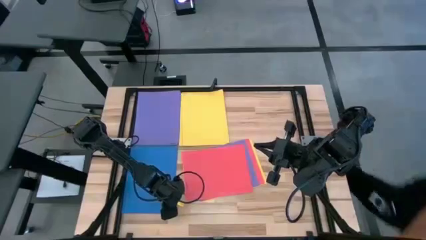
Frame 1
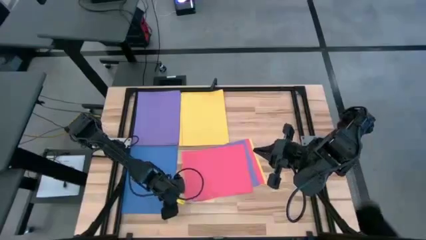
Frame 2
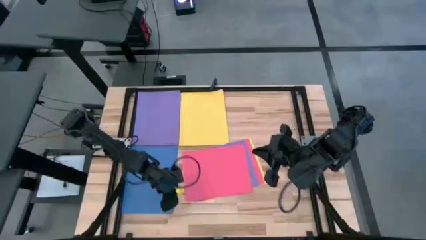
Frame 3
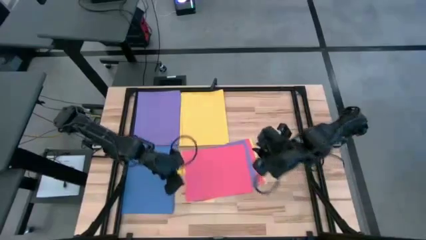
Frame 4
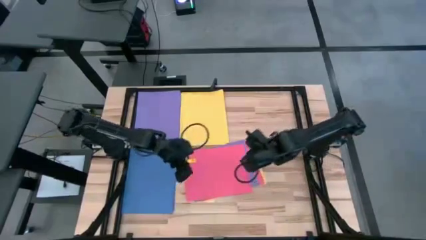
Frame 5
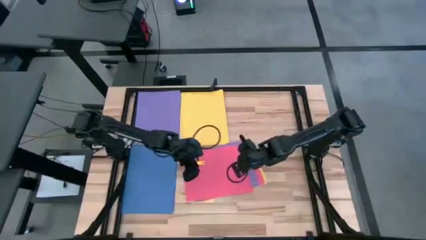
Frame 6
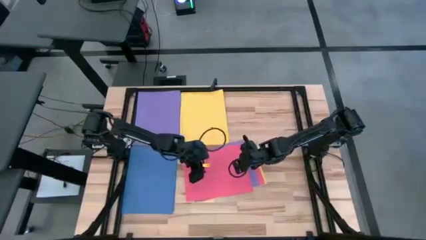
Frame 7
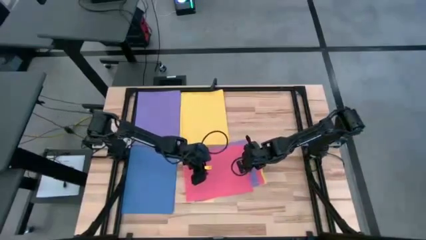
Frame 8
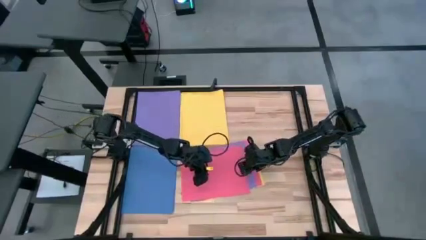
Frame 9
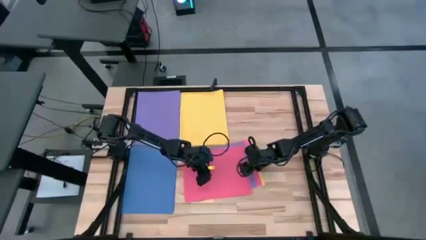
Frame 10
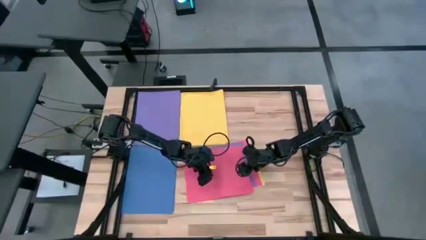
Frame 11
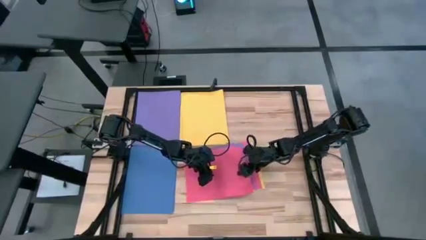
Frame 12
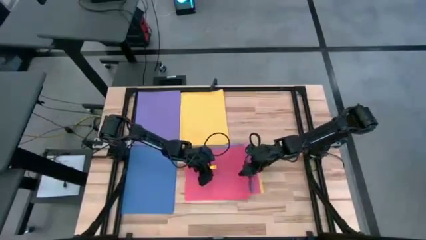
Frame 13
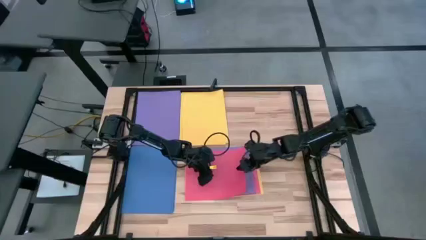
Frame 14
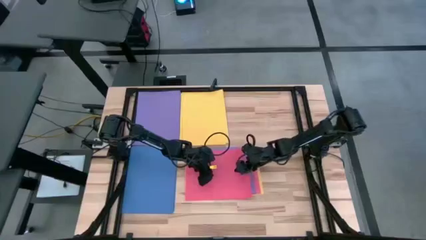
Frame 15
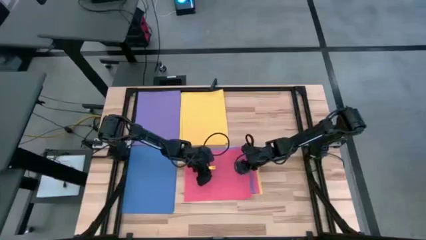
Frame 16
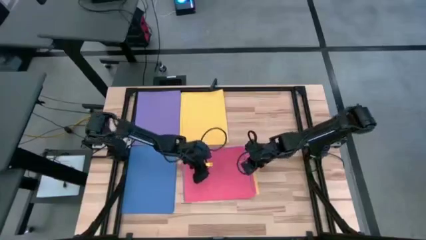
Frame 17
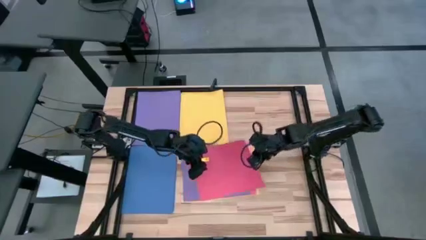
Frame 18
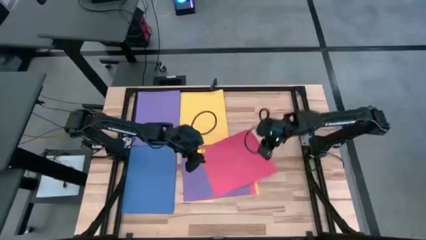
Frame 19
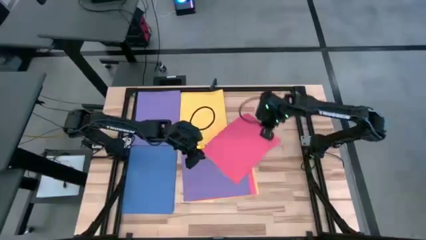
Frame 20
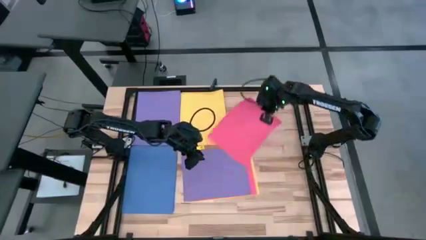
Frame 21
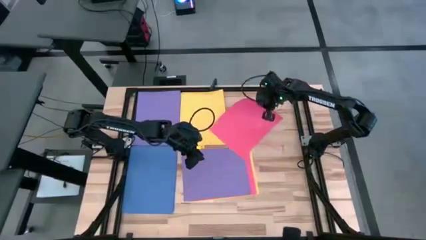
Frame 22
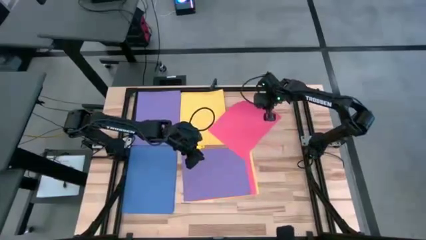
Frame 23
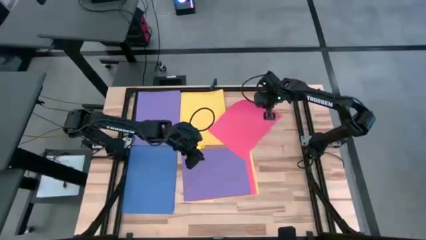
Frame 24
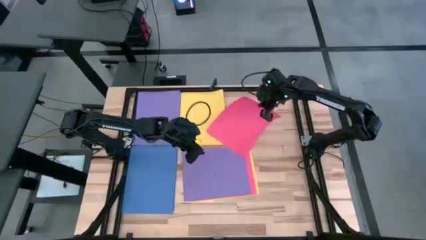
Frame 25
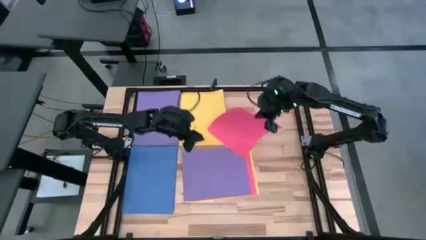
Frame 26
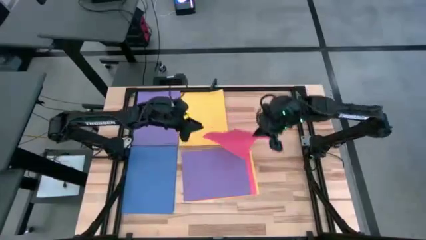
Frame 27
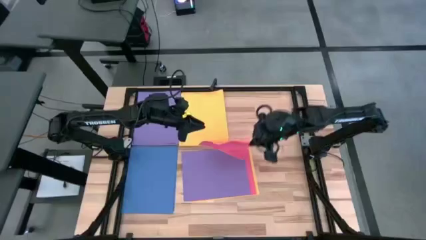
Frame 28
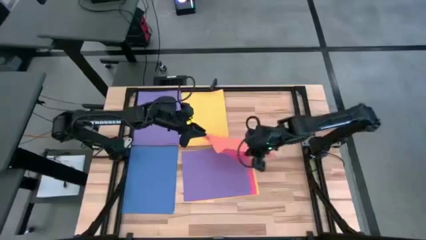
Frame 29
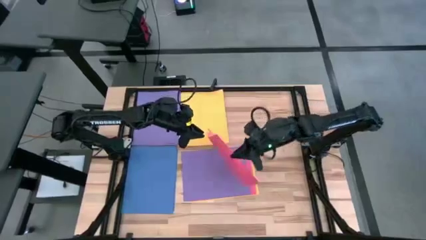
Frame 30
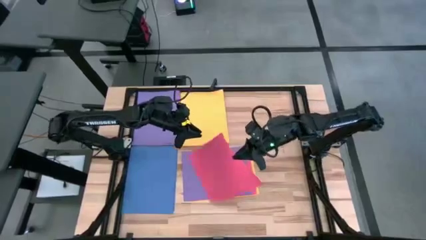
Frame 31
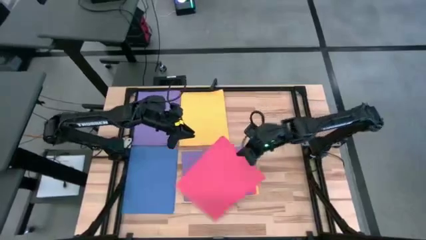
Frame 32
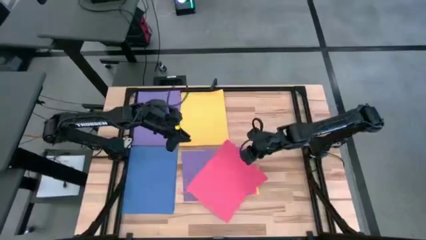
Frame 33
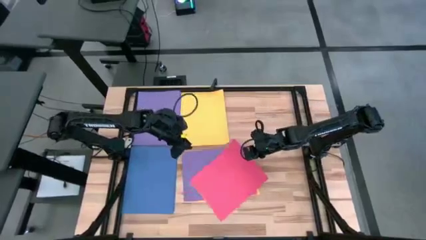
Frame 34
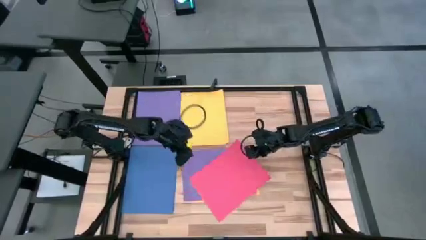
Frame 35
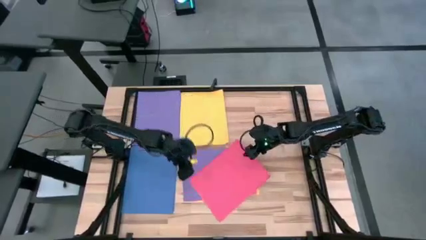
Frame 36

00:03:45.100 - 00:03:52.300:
Task: Organize paper
Move the red paper to the top right of the table

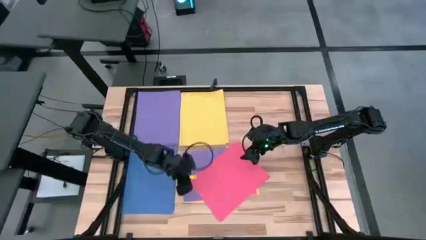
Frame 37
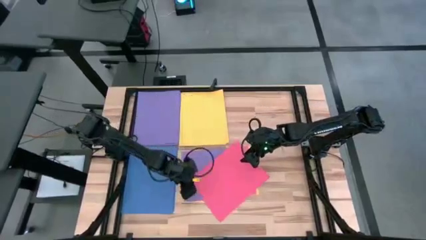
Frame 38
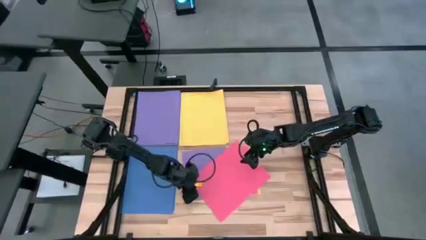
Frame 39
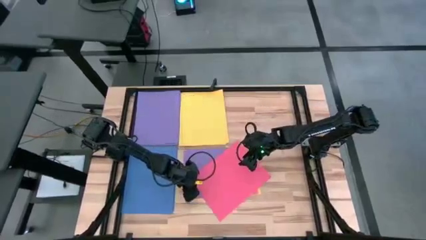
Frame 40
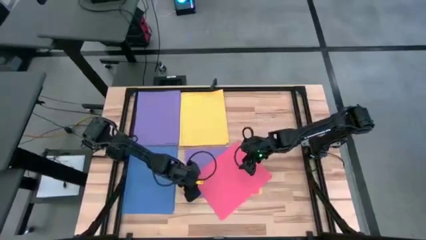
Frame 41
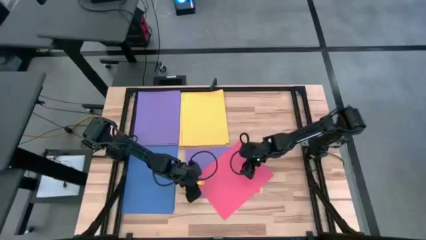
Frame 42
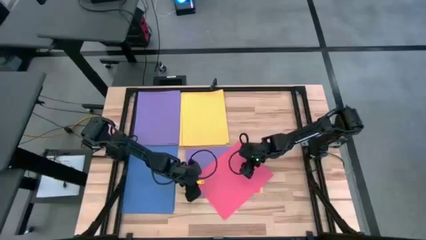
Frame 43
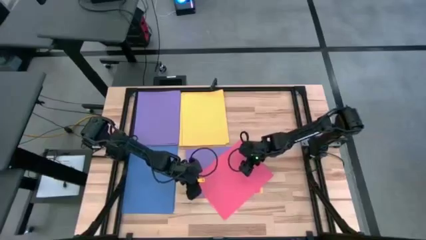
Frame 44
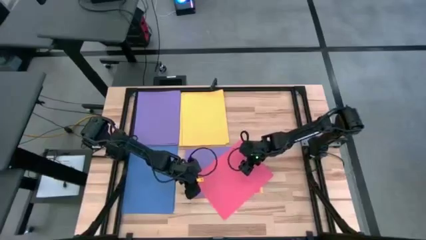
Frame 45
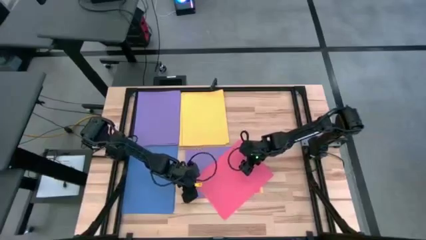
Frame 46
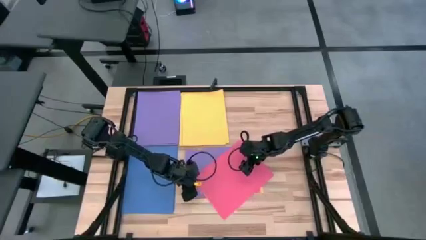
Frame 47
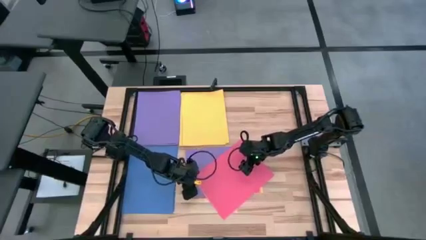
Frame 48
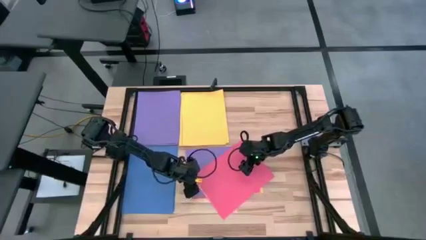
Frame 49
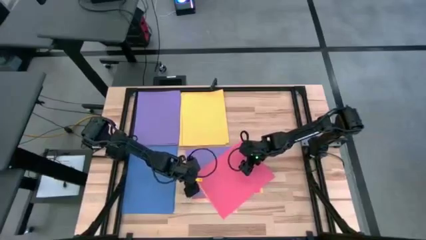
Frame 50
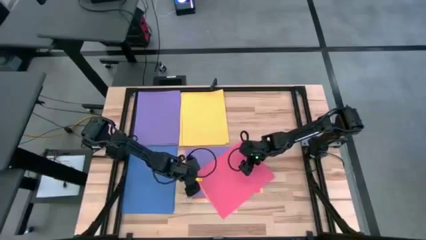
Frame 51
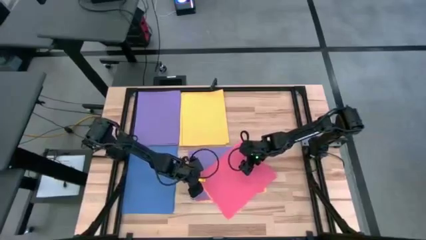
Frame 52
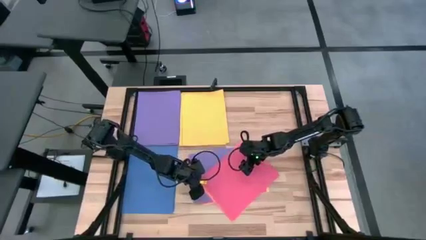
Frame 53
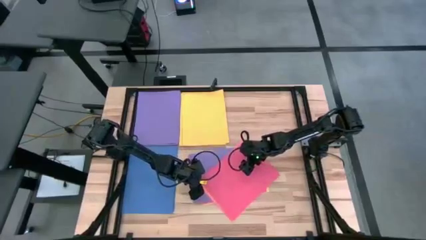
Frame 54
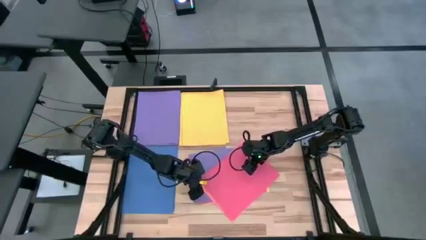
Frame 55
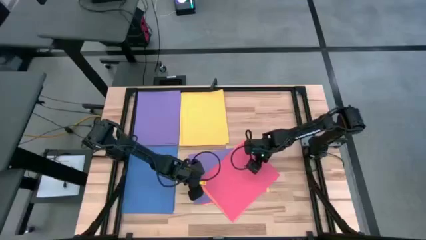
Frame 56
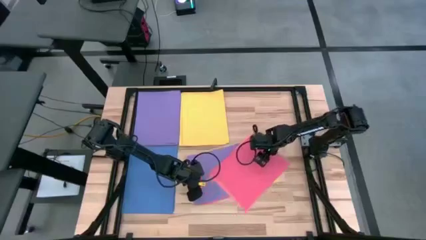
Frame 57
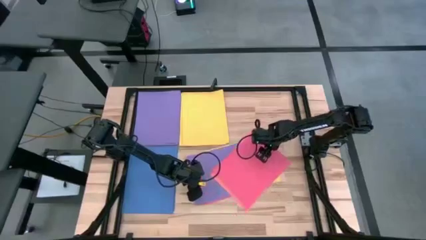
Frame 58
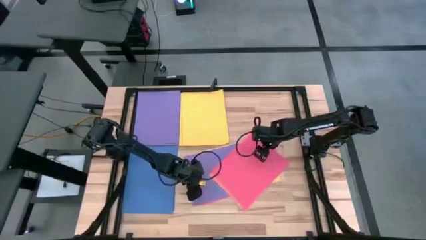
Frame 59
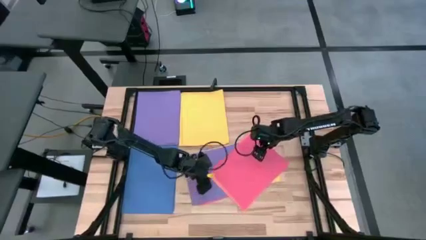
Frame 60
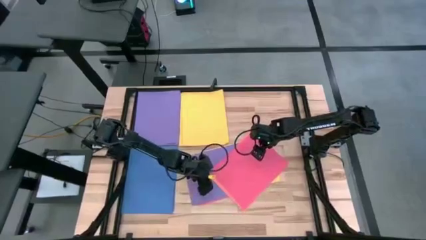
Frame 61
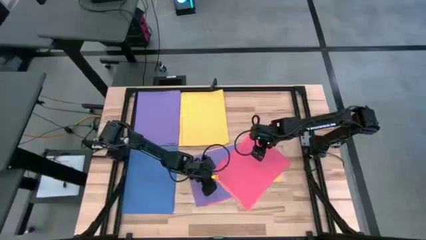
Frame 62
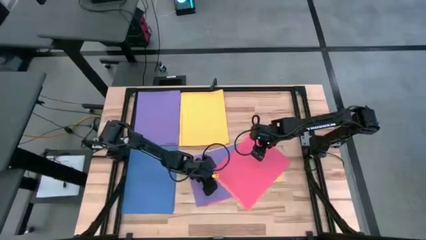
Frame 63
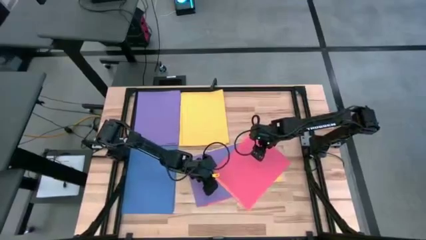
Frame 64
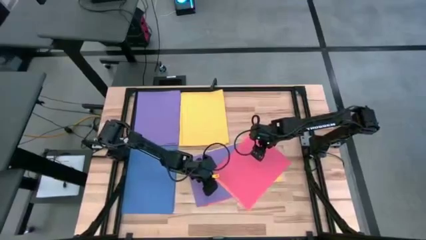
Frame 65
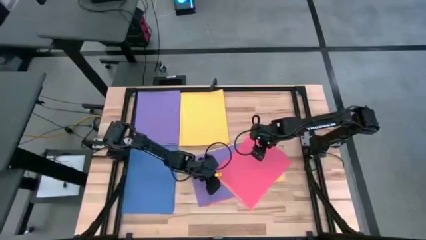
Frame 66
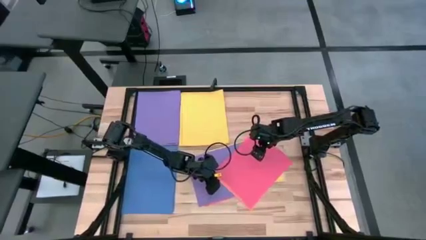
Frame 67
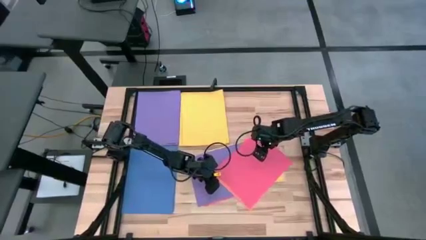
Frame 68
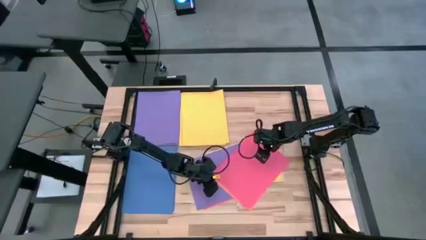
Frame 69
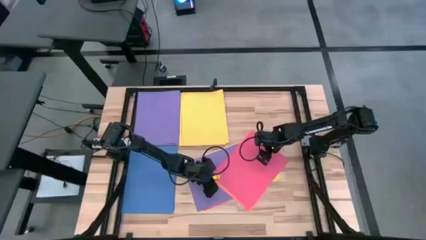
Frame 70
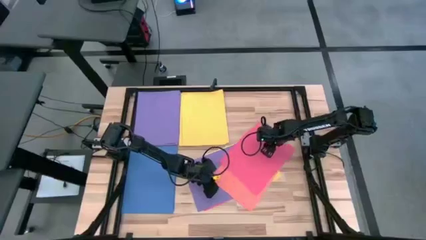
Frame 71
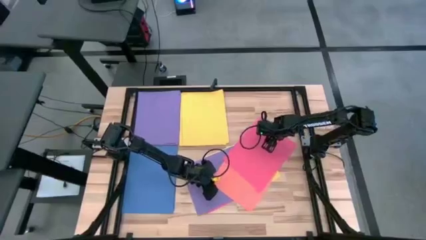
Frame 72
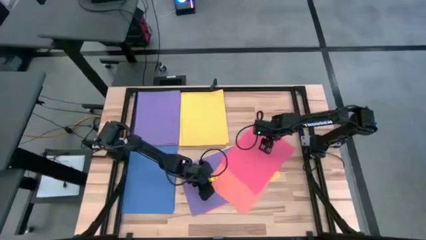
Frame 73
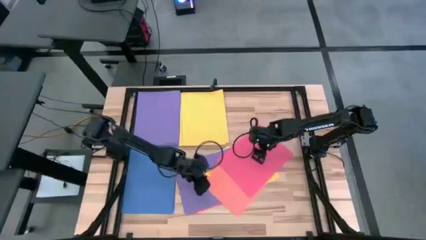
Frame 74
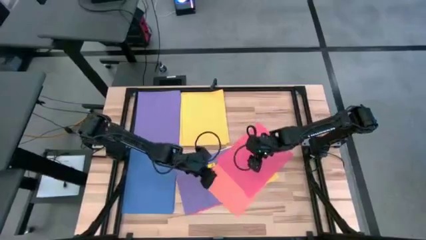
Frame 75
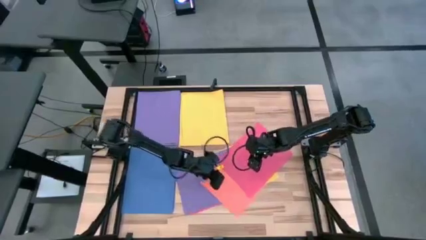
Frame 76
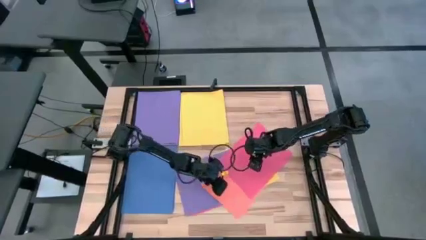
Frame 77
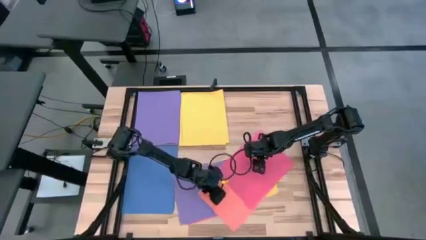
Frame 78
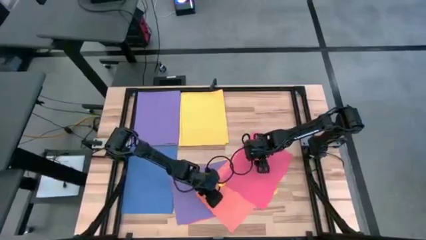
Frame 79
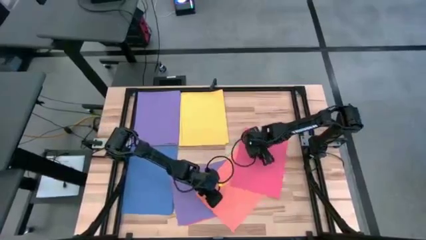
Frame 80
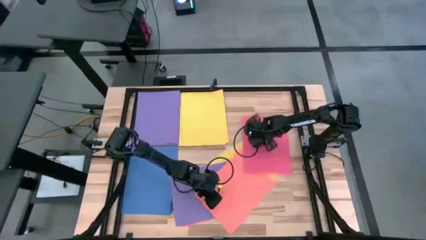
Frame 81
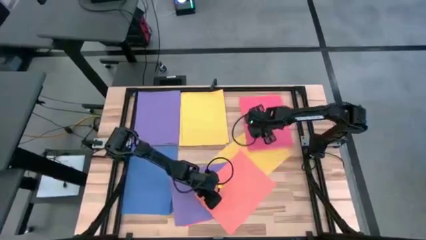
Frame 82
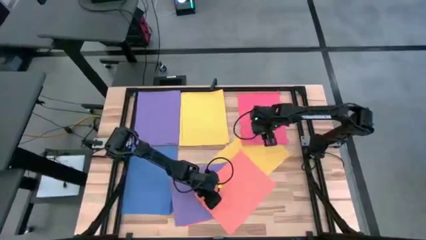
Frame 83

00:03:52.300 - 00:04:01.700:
Move the red paper to the top right of the table
